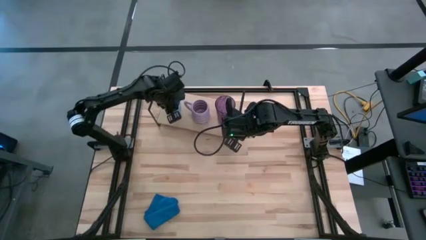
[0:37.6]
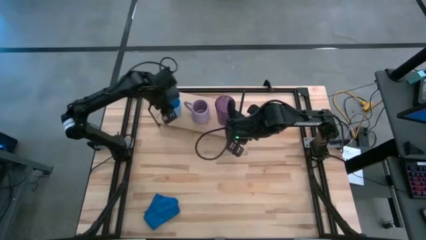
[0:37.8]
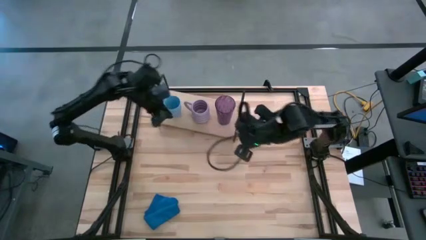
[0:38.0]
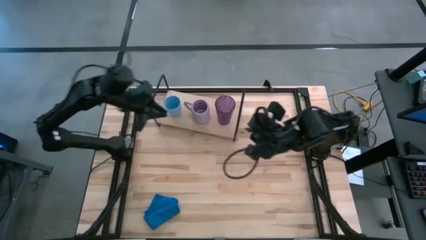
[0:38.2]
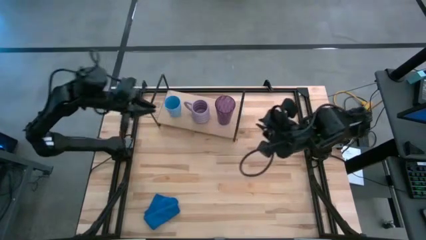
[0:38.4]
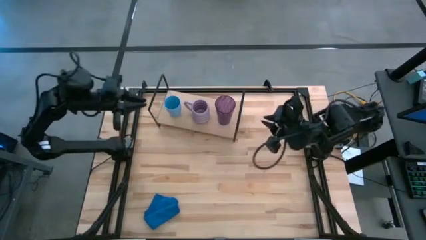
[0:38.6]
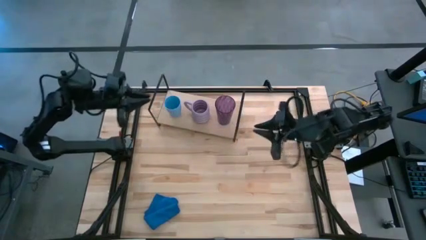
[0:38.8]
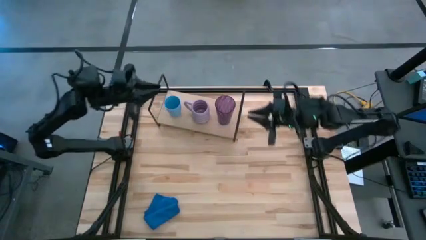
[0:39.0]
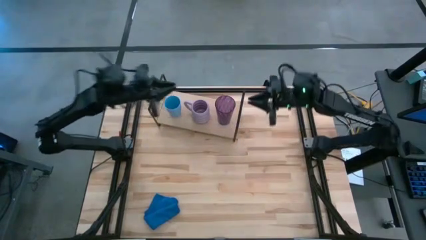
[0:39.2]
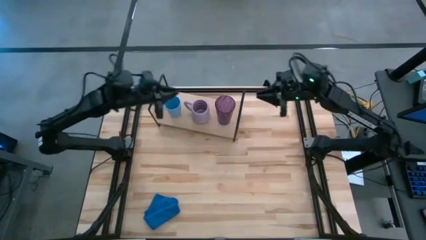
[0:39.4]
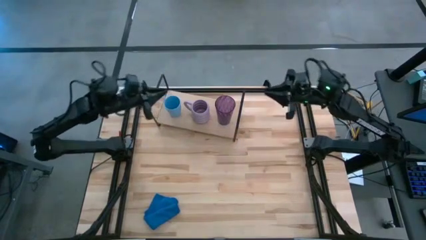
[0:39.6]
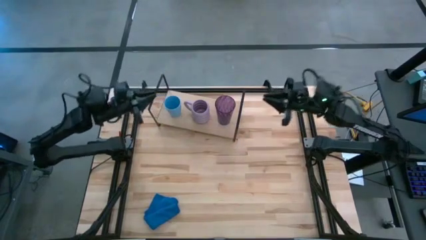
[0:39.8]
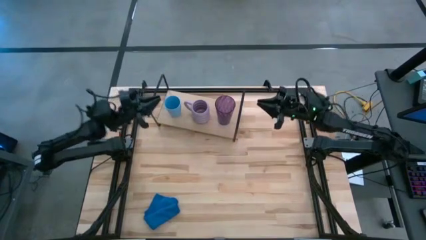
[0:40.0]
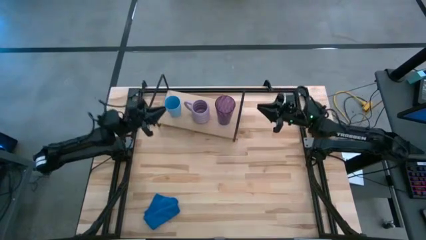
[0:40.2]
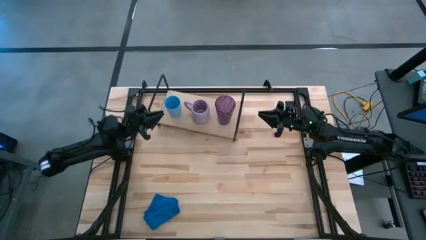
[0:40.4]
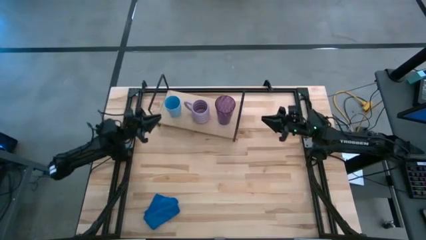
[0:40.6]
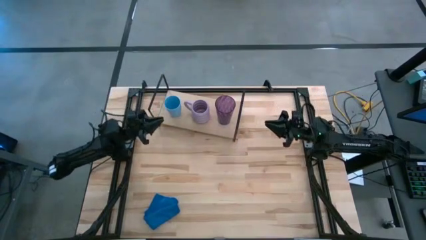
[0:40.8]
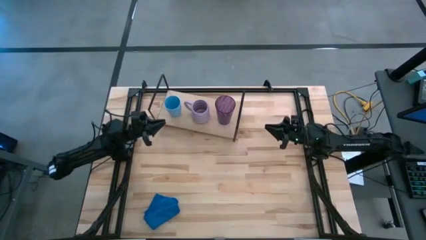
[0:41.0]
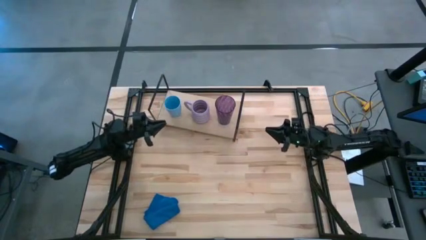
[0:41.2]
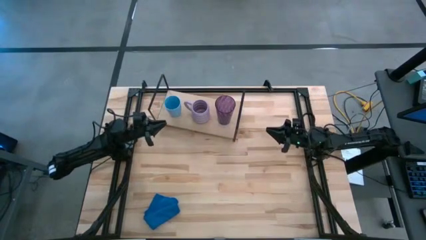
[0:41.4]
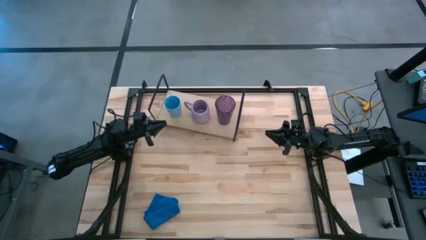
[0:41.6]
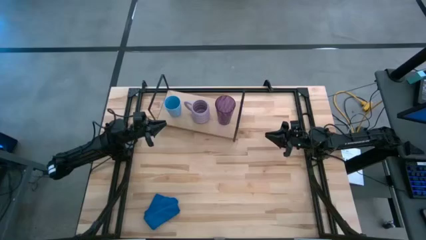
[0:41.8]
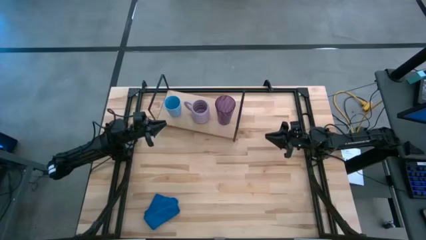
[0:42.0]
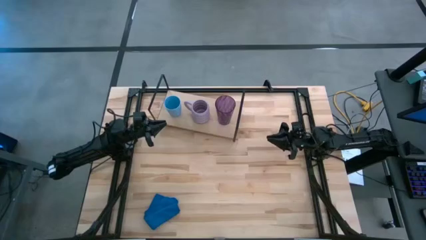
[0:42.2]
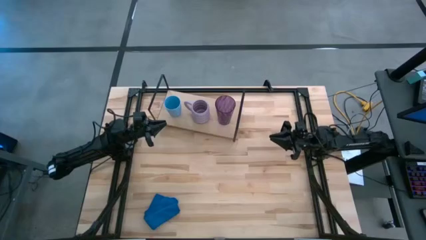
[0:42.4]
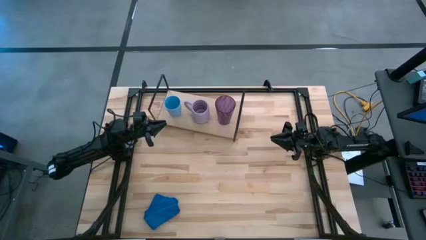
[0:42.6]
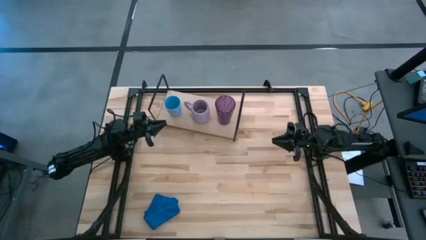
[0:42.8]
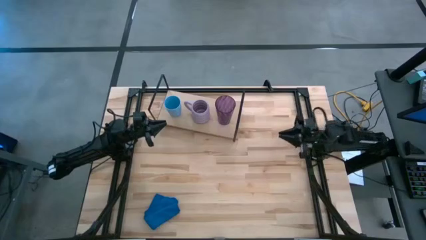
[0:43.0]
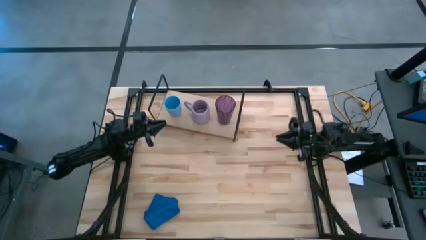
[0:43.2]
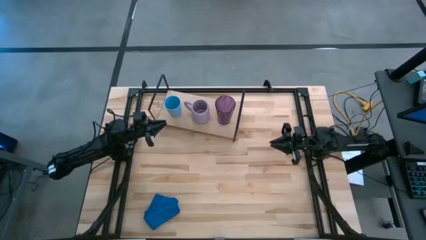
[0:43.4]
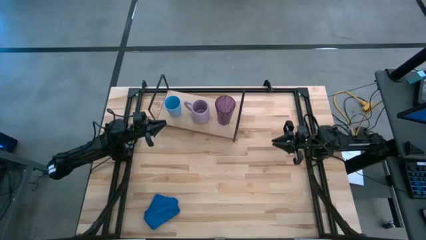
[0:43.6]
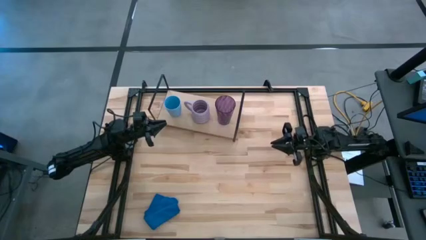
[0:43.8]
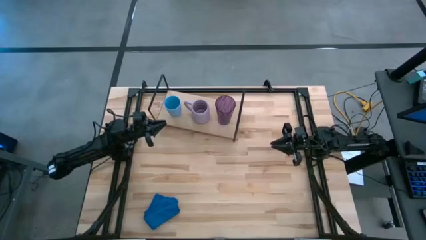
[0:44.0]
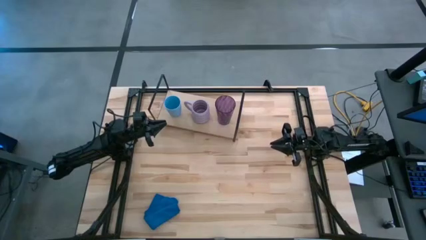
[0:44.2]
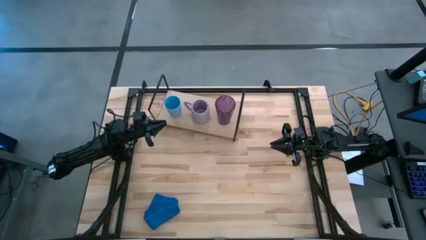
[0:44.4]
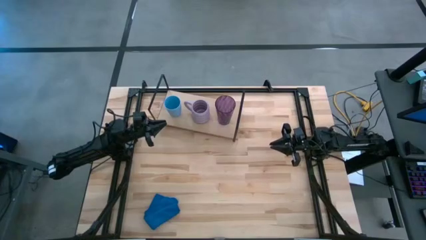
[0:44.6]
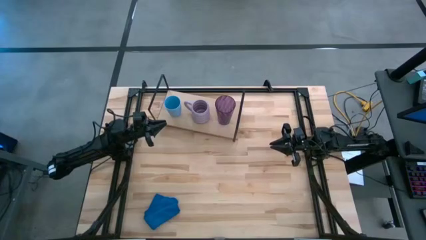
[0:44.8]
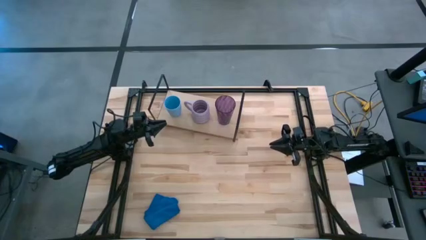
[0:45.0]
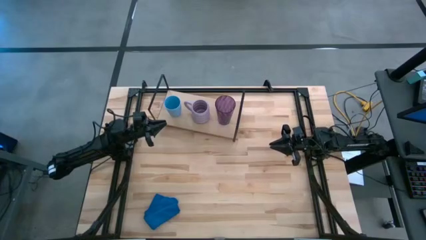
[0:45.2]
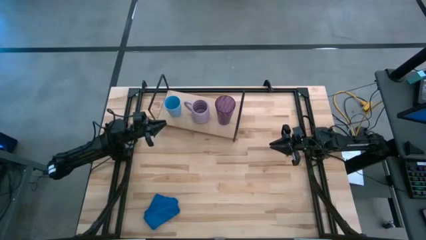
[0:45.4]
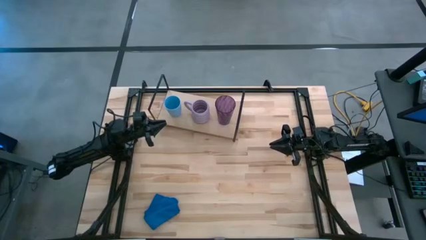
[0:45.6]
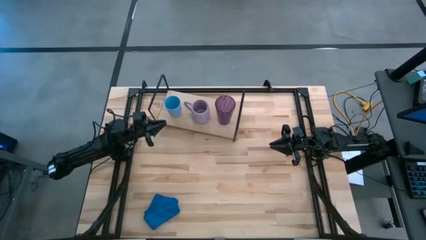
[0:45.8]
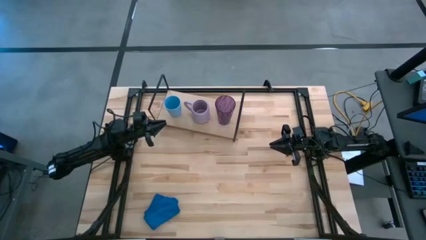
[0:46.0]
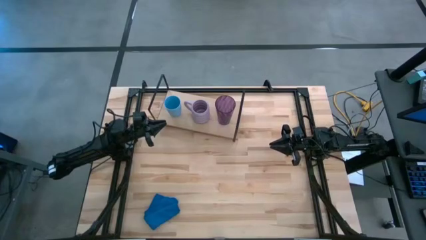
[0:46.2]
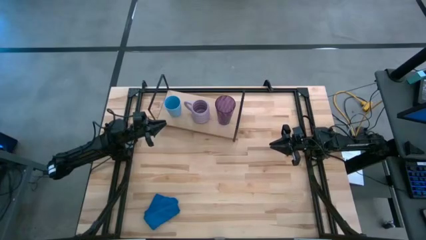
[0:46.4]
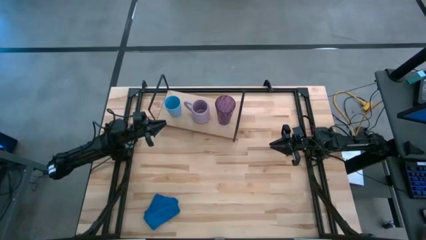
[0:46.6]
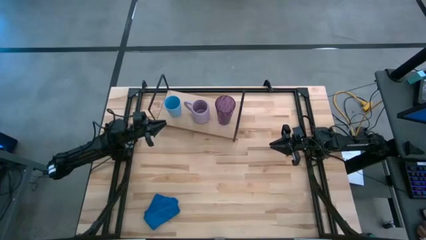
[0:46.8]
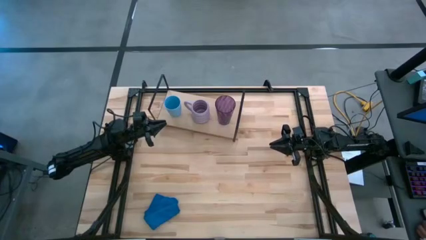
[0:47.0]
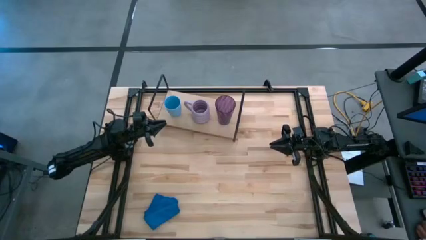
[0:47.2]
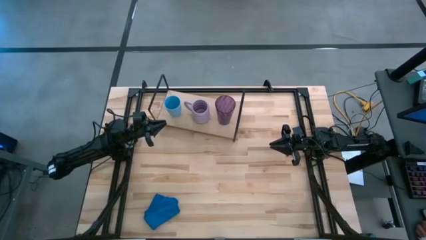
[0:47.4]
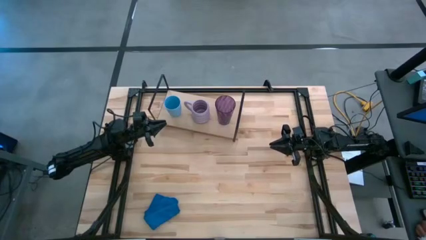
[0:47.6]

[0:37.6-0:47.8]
Task: Stack small to large cups/mugs on shelf
Return to Home Position

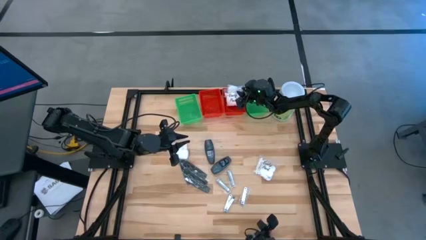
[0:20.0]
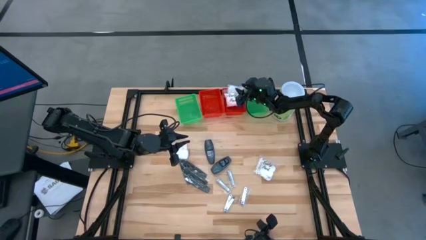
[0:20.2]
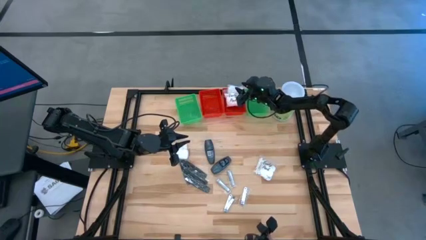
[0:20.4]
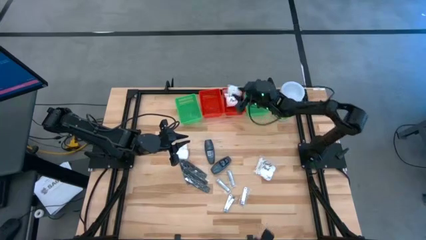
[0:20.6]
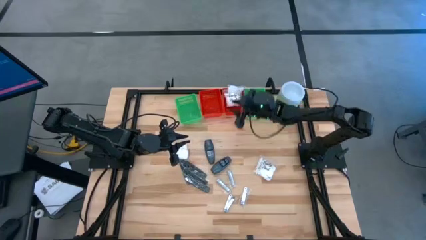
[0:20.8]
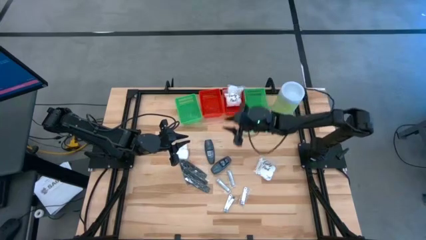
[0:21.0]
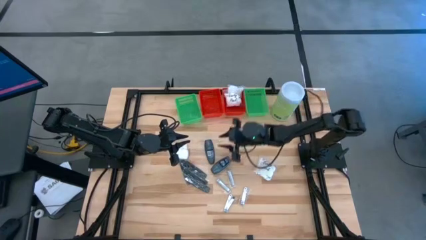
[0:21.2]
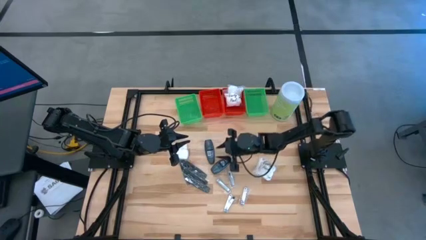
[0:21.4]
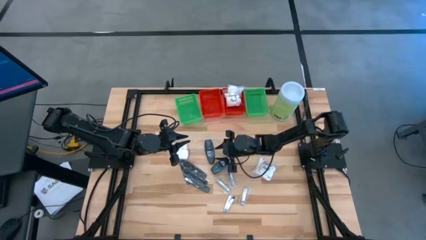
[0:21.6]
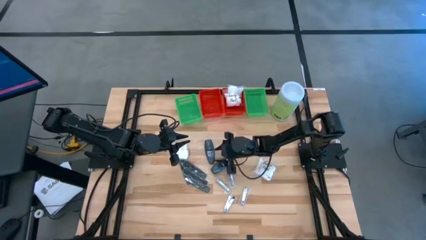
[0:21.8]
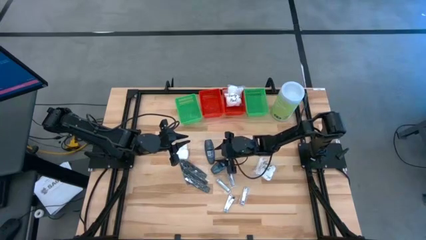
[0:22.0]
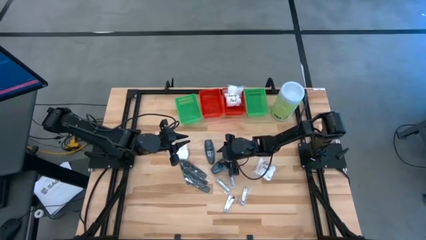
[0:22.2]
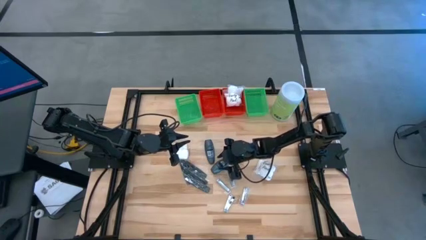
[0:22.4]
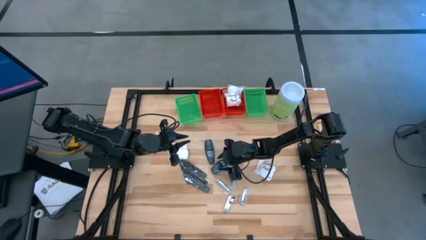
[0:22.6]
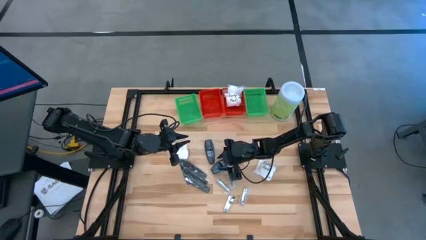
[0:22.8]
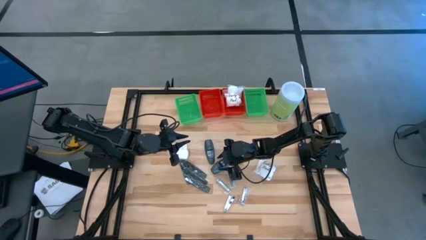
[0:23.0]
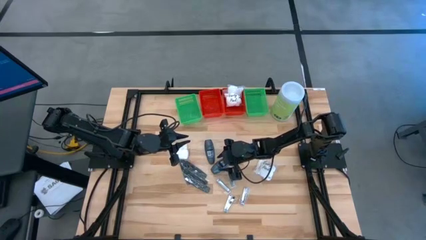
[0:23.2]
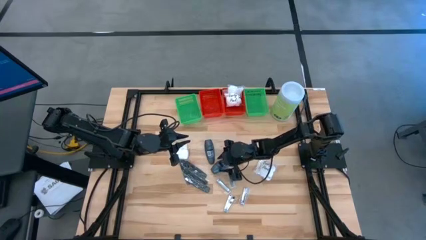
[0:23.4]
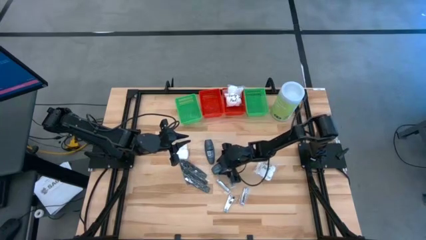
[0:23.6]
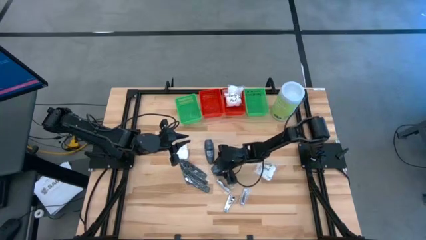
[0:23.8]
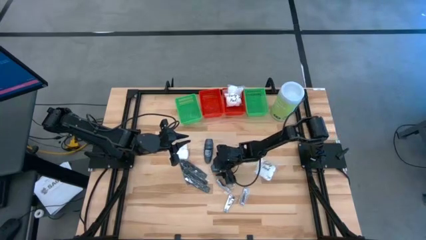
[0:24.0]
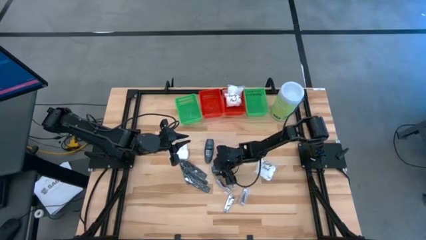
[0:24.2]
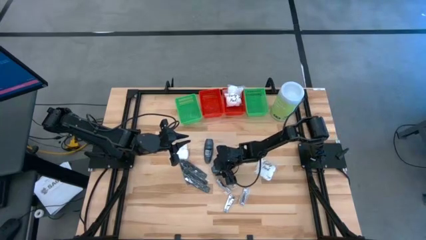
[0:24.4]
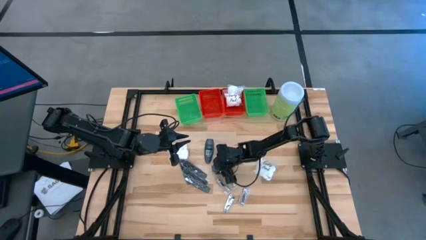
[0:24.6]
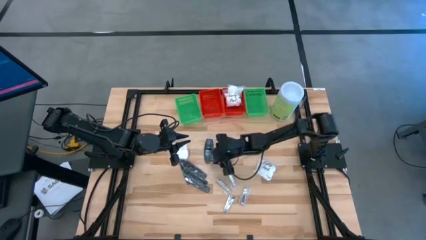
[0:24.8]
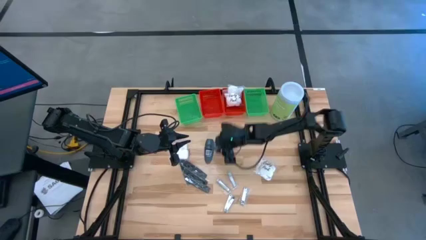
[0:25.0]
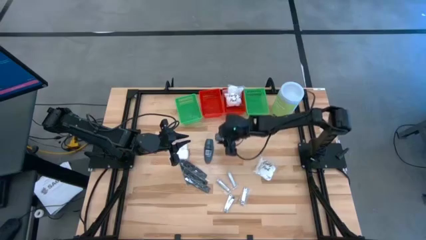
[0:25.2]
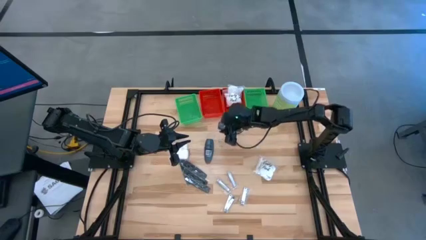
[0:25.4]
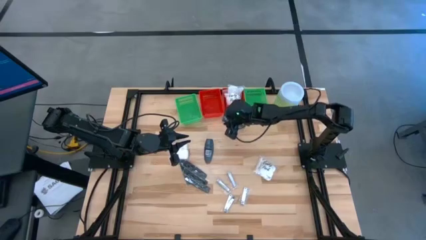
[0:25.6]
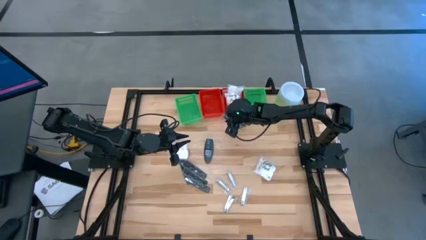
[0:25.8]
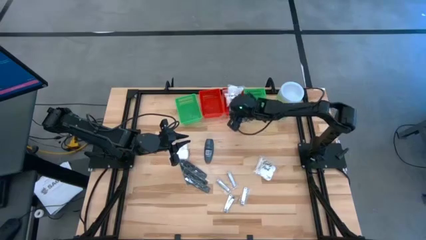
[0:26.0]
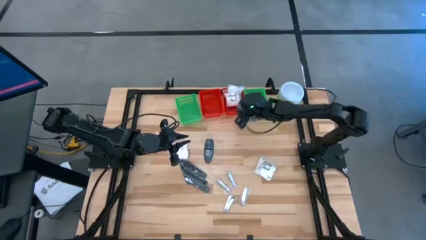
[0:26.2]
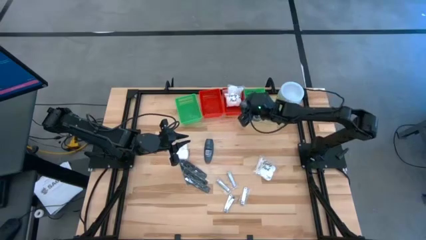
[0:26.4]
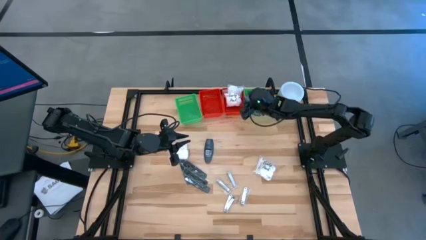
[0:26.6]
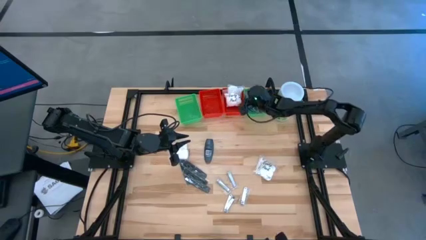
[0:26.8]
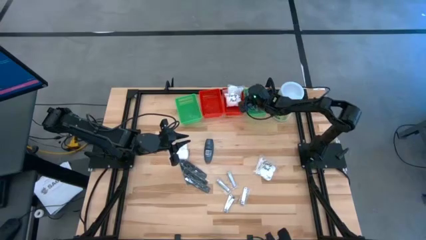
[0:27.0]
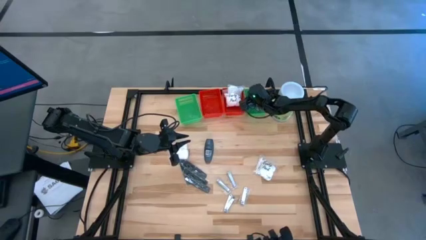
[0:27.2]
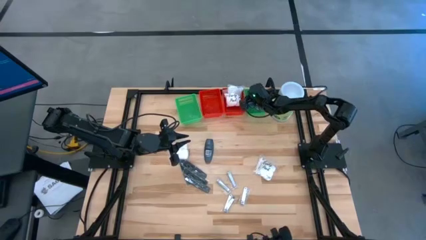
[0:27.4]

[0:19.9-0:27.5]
Task: Pick & Place Travel size toiletries
Put the gray deodorant into the right green bin
